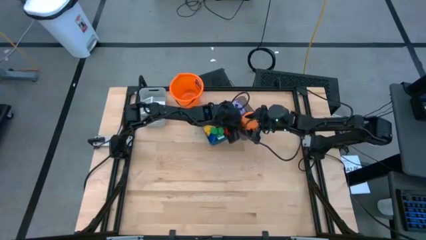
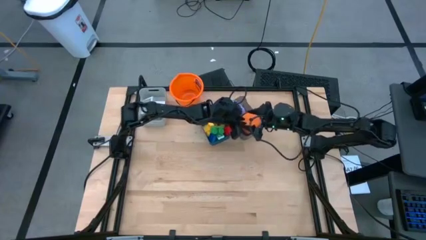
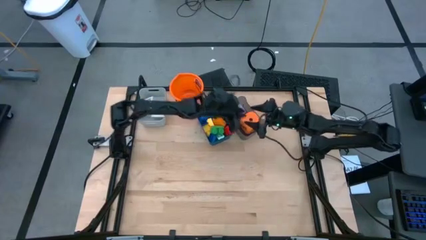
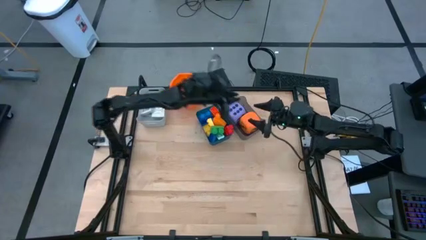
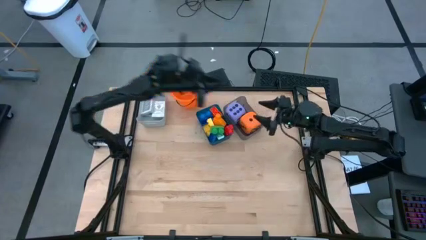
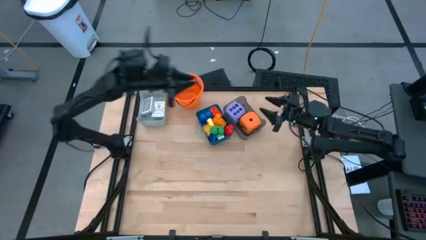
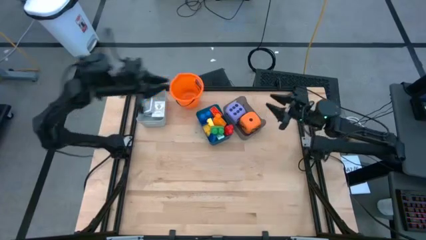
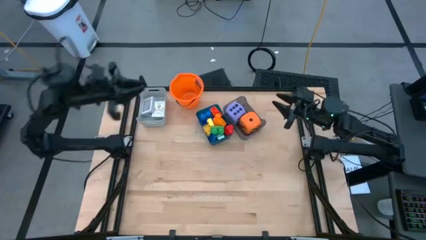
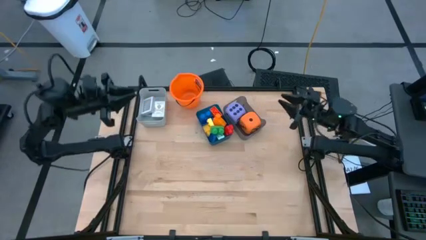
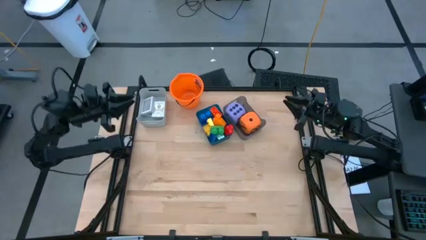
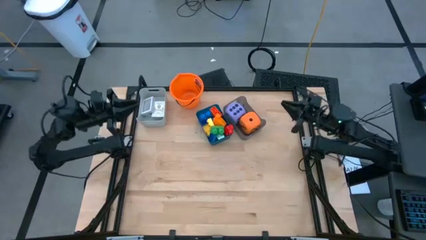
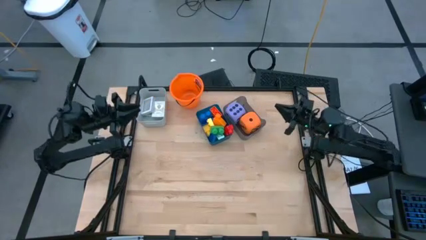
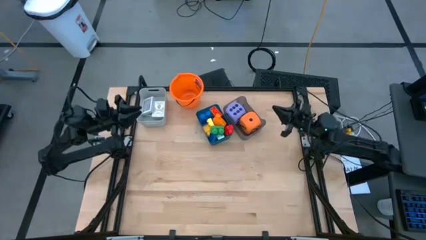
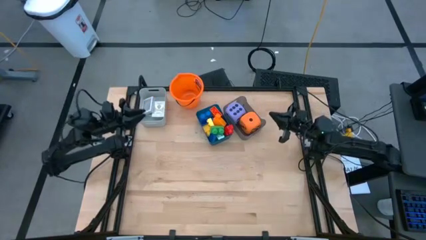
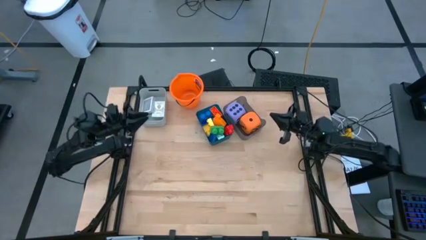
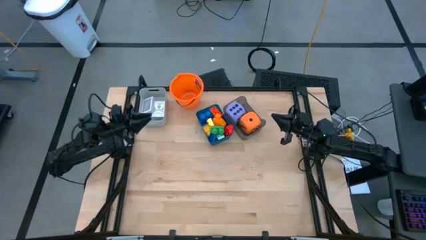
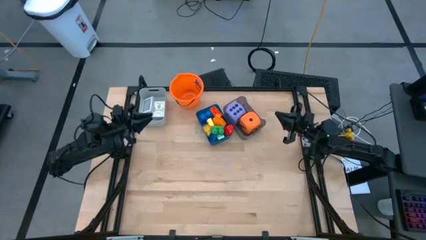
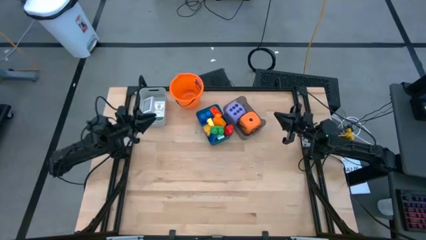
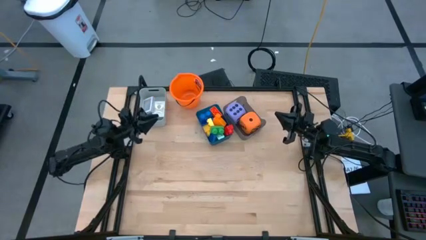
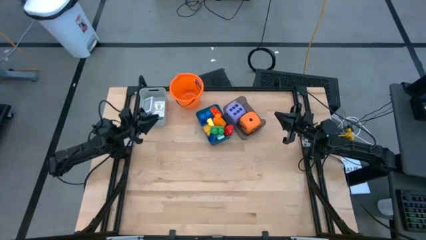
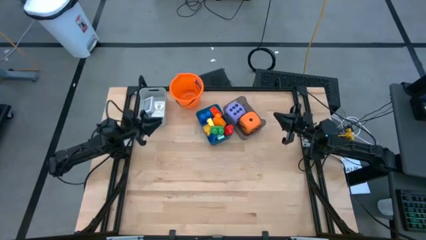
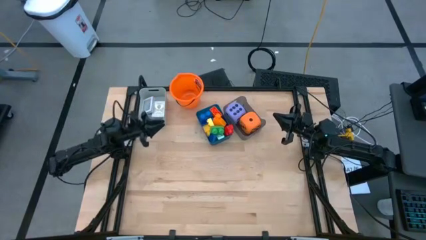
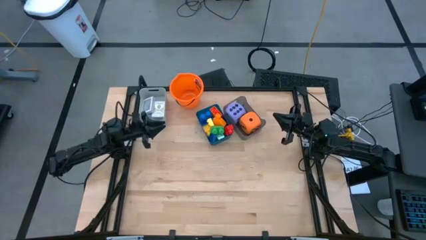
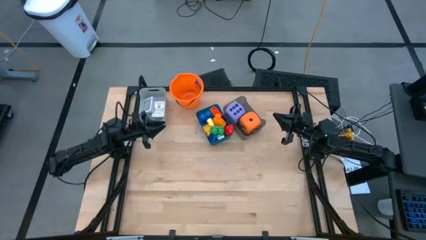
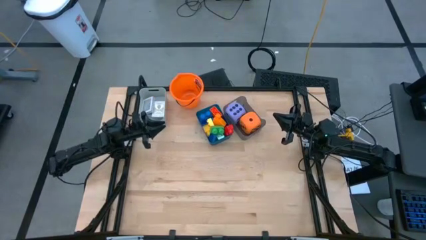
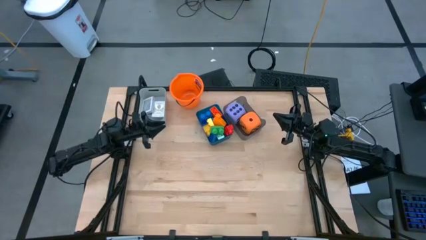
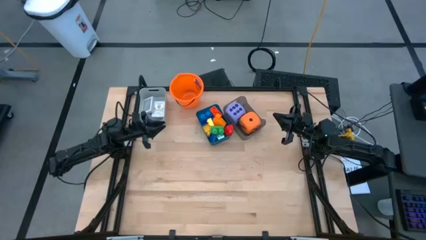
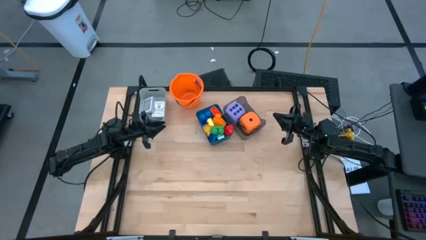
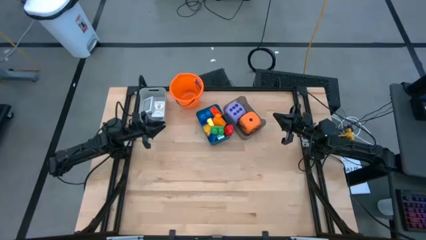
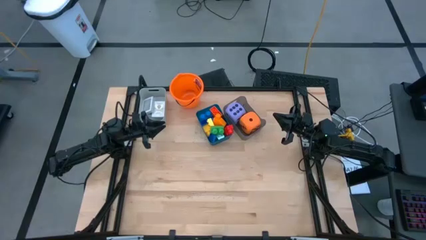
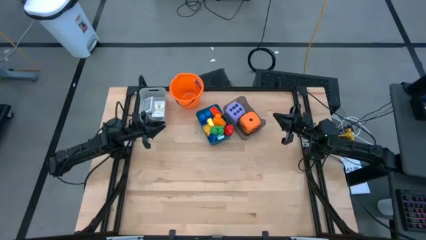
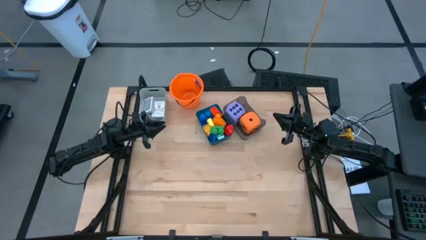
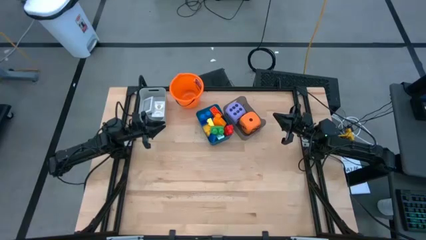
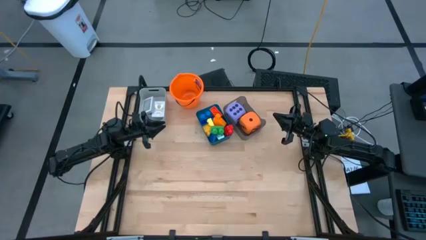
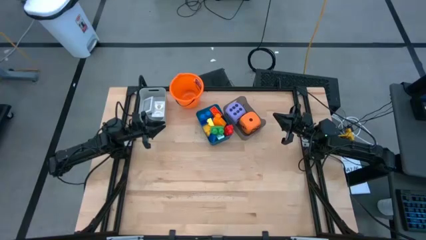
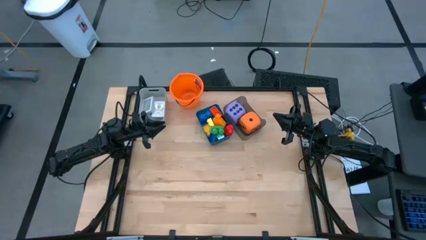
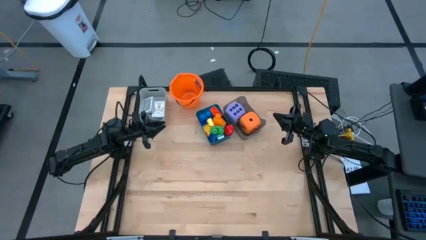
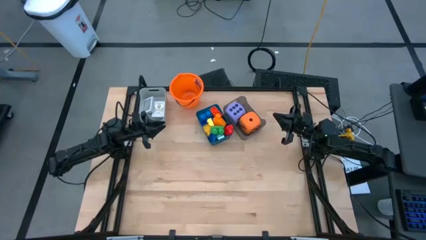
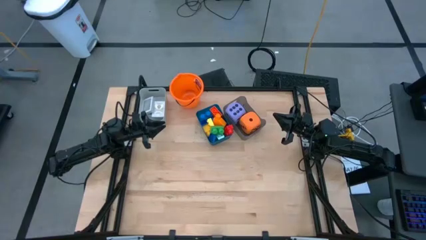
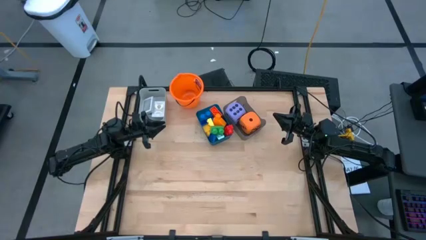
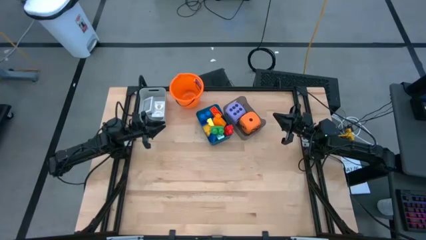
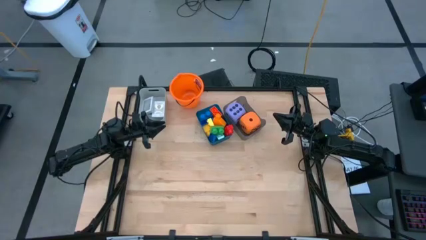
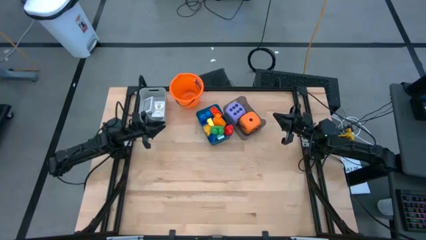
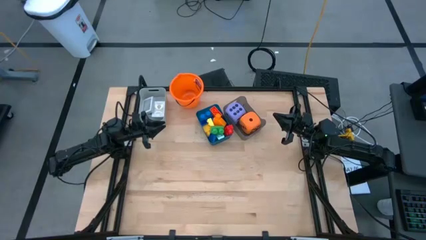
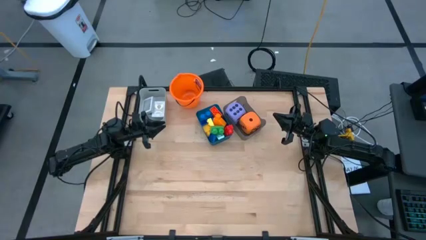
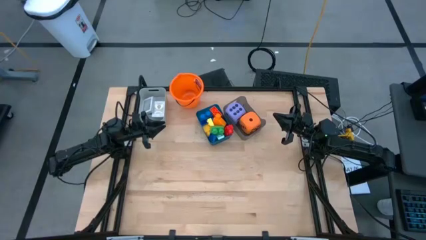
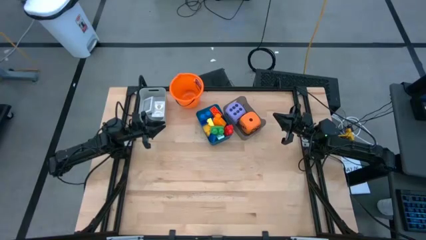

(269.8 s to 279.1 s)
Task: Pick & Place Toys
Return to Home Position

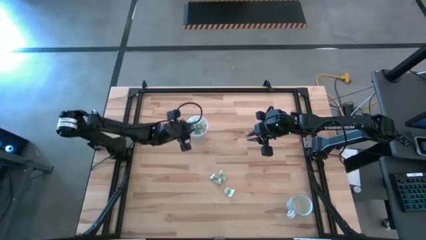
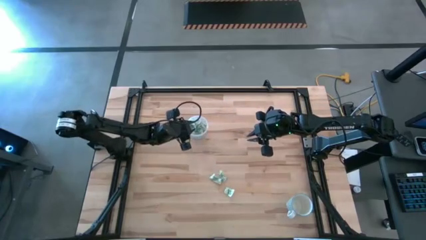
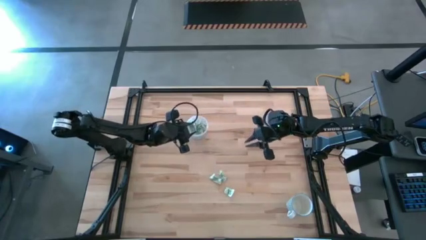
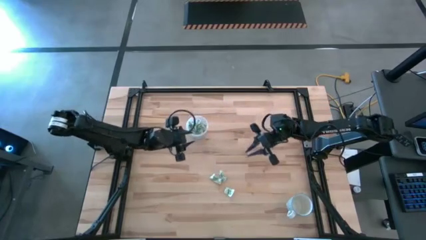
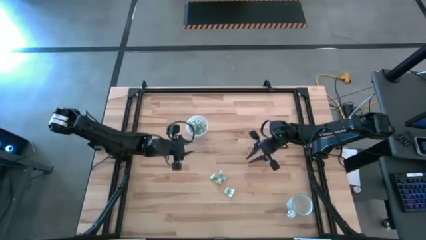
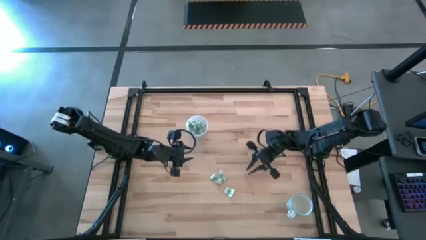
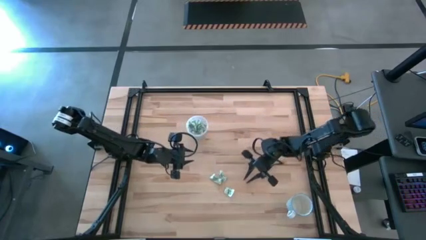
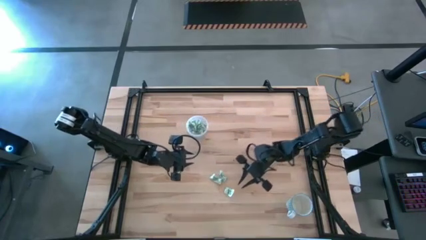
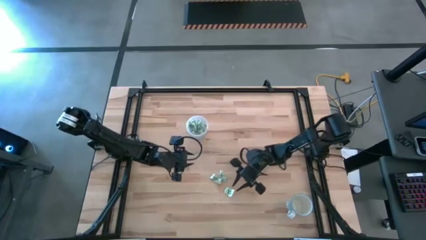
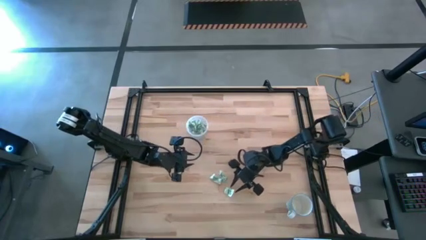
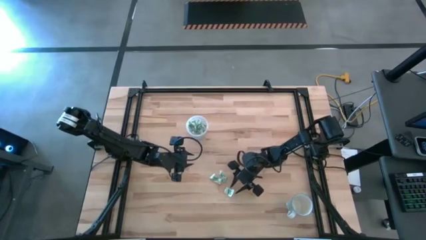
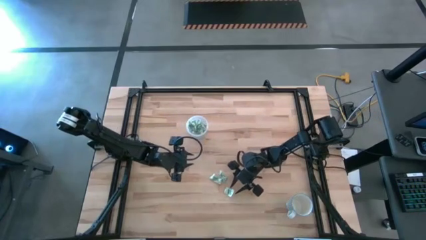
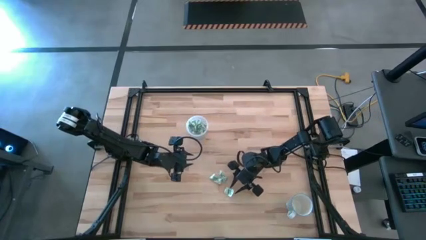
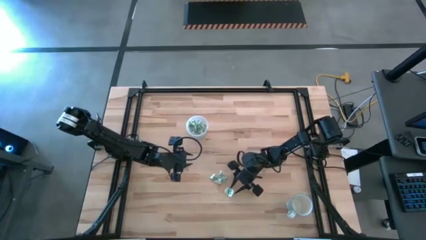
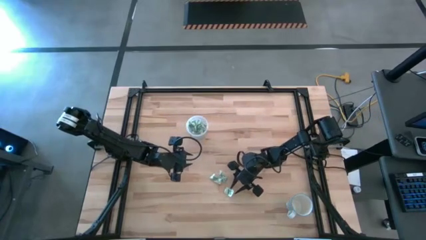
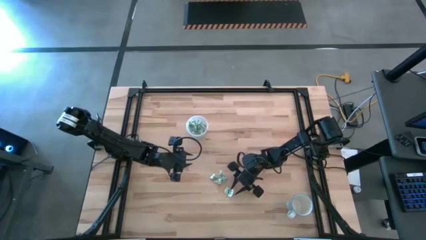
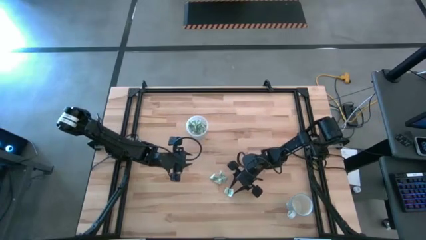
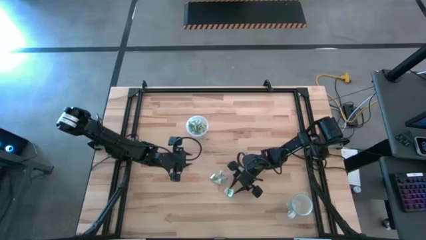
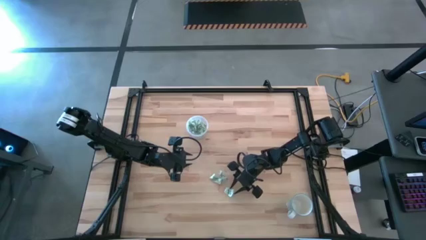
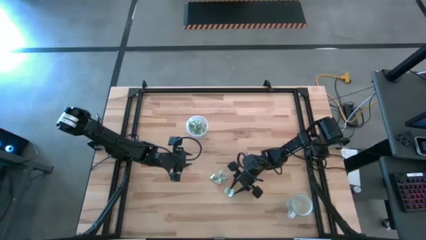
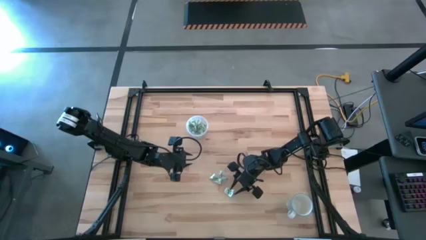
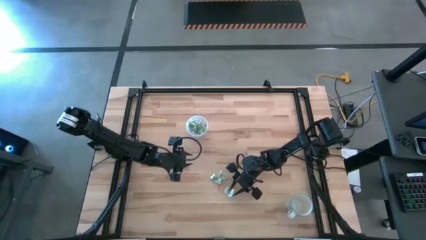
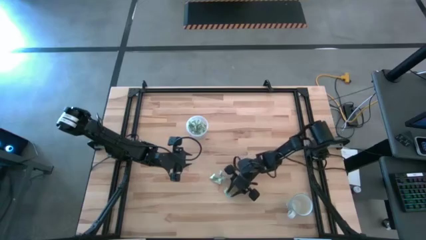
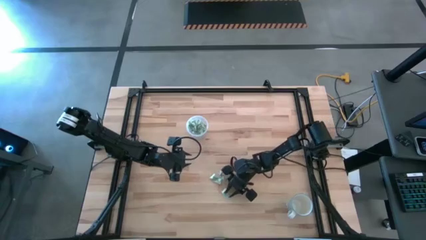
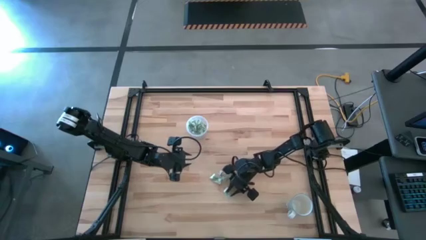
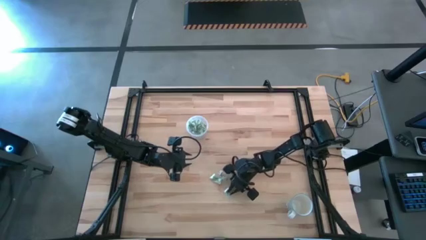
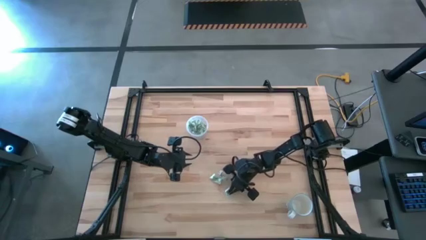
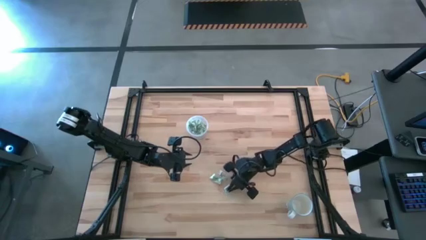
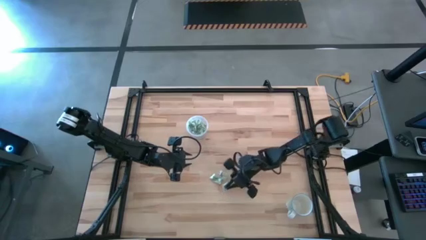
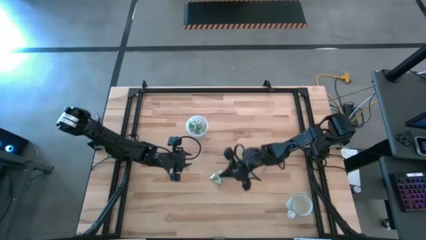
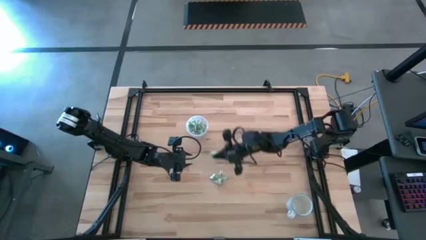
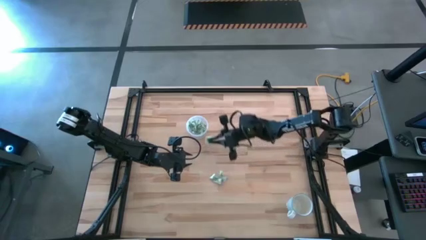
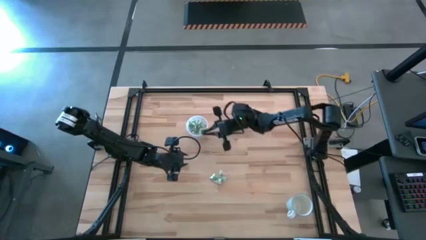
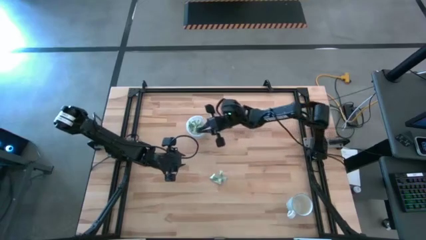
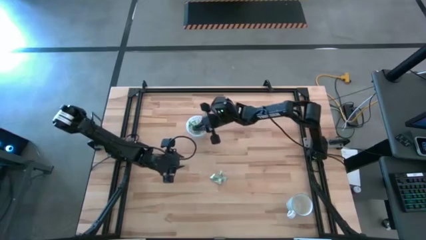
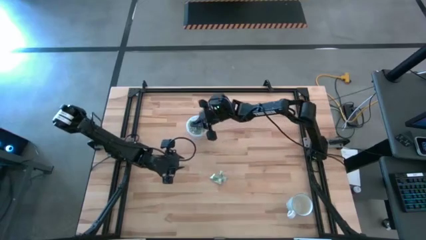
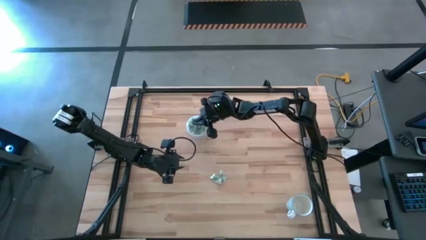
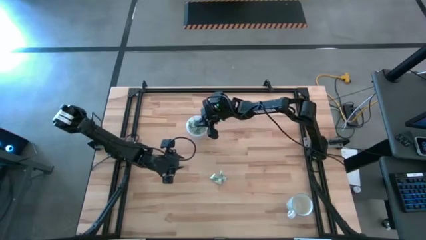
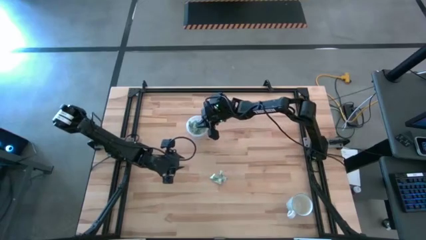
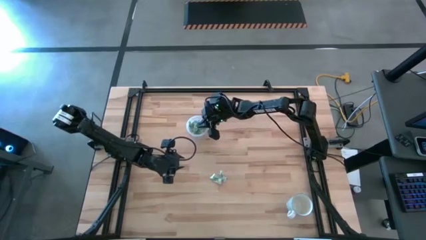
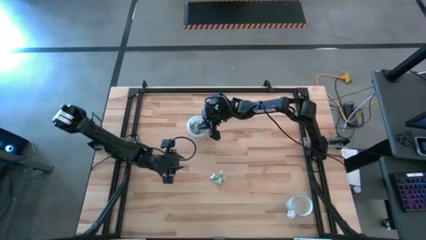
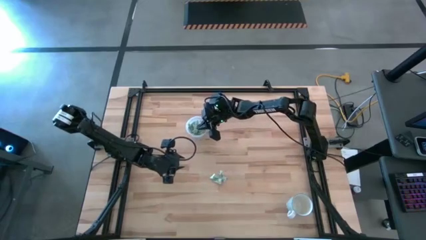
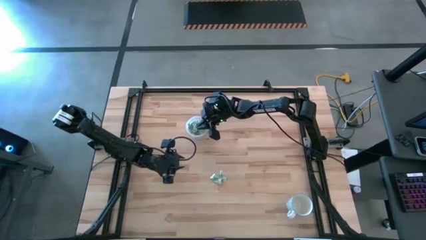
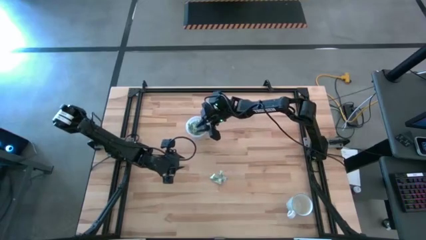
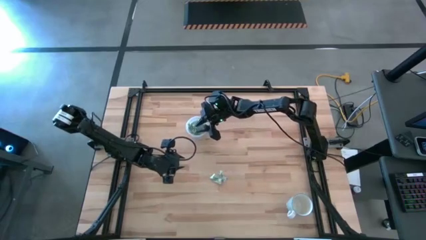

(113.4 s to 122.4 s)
Task: Pick and place Stevia / Truvia into bins
Put the stevia packet into the transparent container
